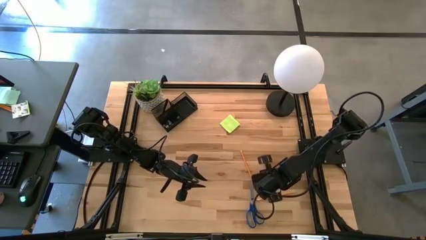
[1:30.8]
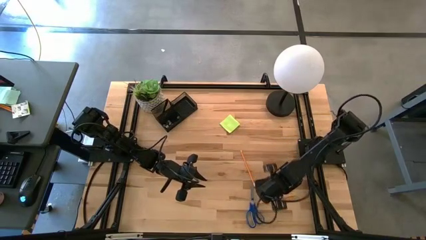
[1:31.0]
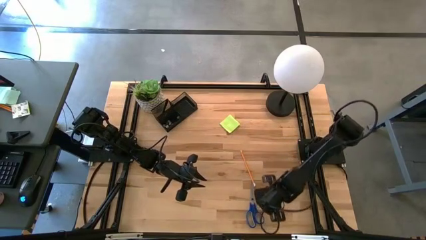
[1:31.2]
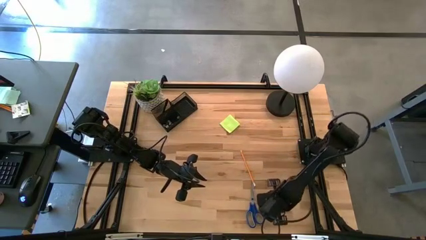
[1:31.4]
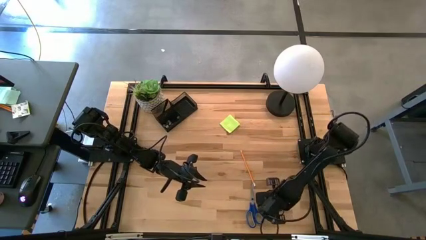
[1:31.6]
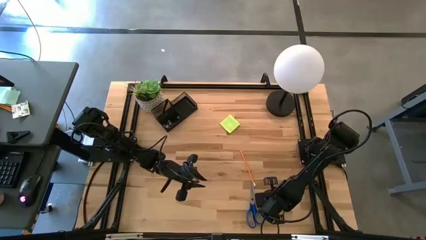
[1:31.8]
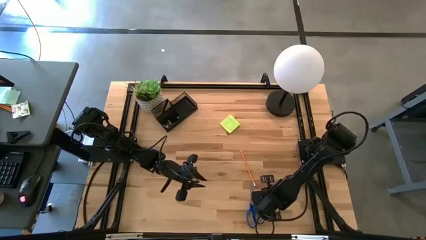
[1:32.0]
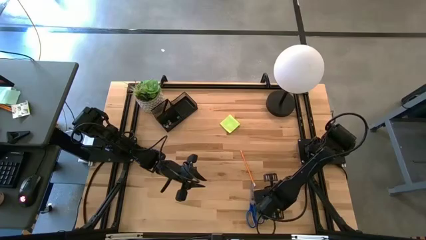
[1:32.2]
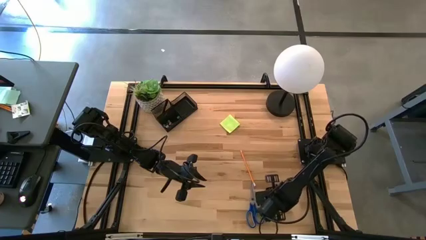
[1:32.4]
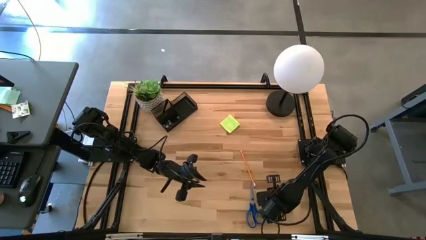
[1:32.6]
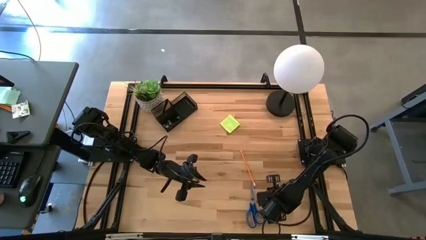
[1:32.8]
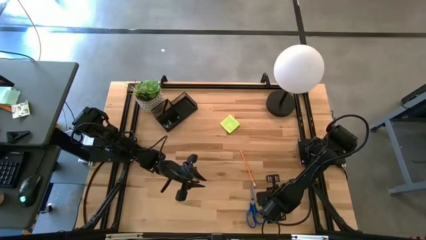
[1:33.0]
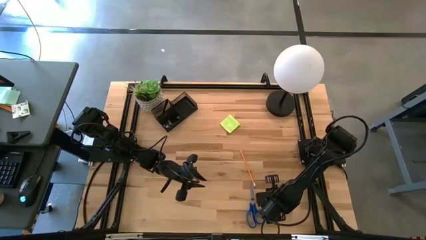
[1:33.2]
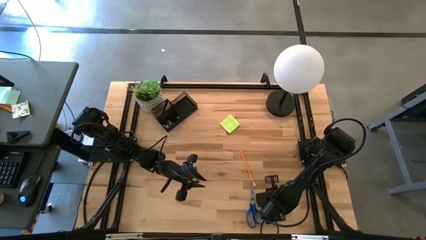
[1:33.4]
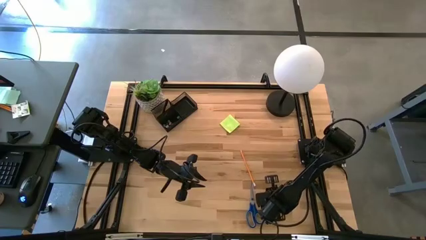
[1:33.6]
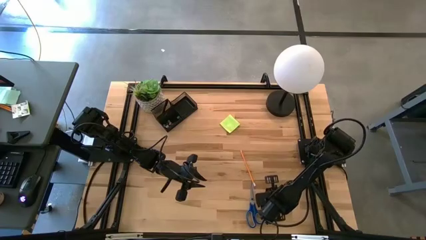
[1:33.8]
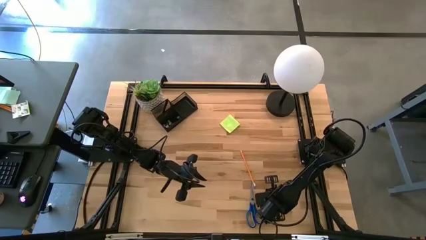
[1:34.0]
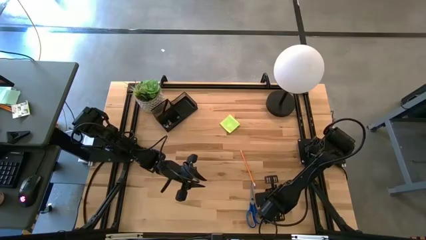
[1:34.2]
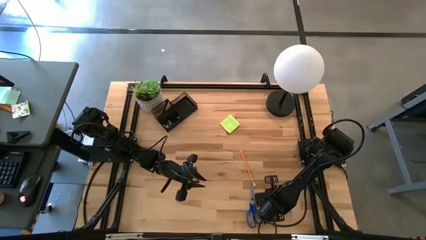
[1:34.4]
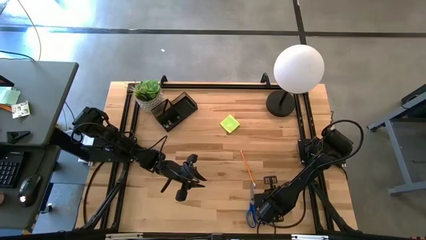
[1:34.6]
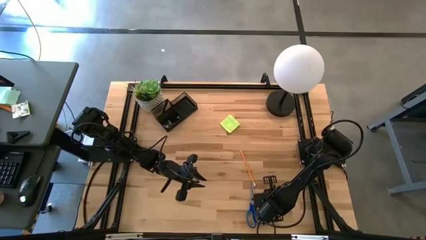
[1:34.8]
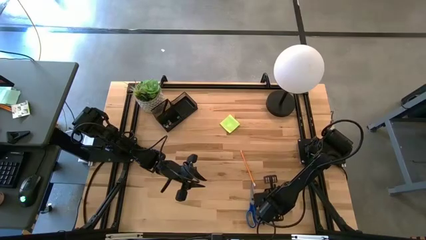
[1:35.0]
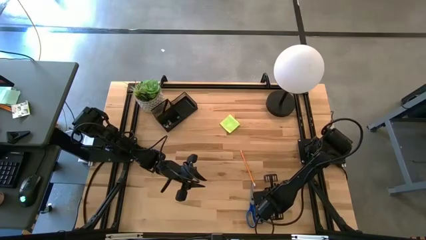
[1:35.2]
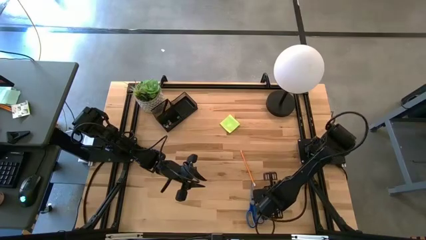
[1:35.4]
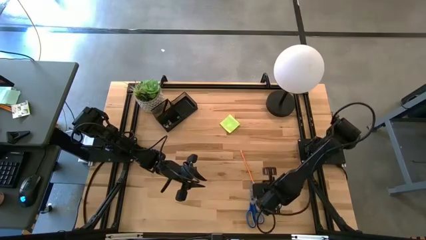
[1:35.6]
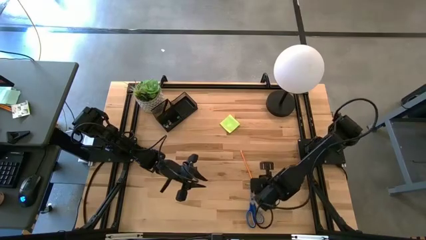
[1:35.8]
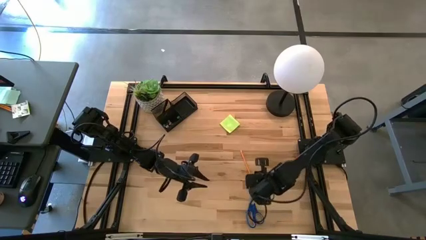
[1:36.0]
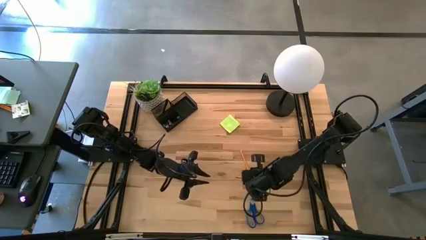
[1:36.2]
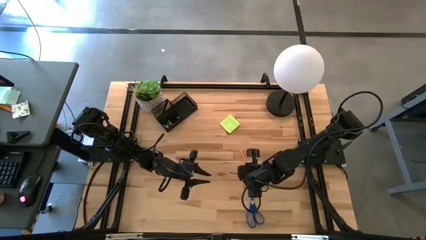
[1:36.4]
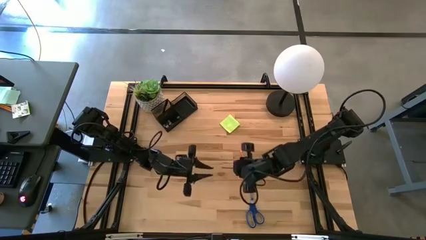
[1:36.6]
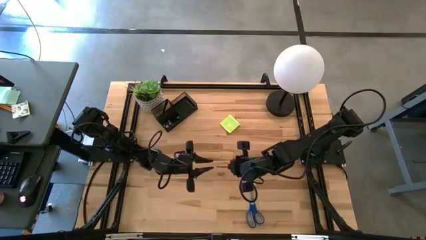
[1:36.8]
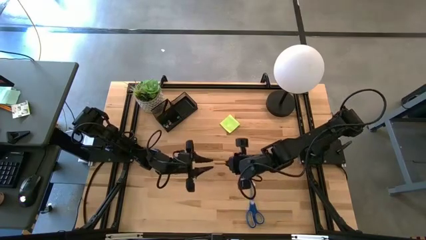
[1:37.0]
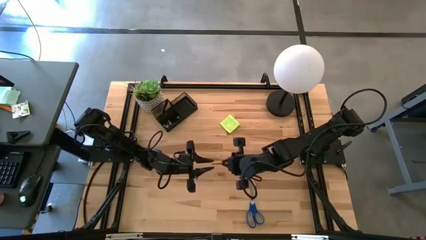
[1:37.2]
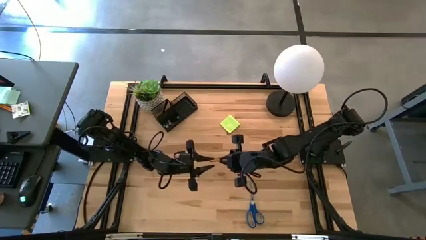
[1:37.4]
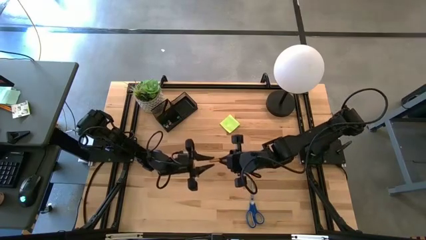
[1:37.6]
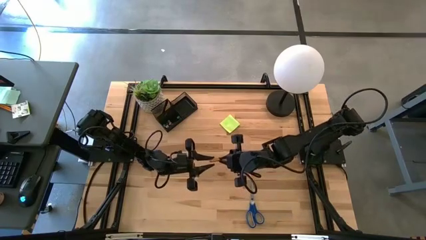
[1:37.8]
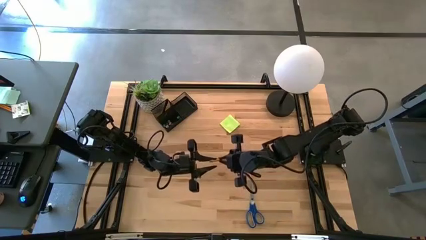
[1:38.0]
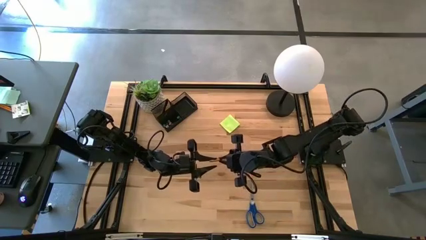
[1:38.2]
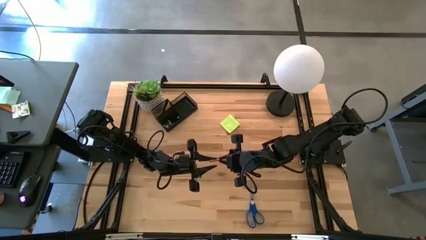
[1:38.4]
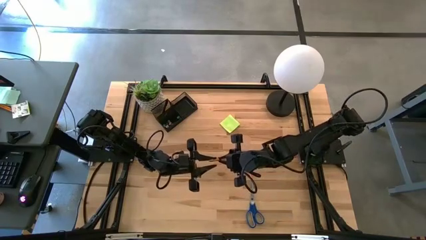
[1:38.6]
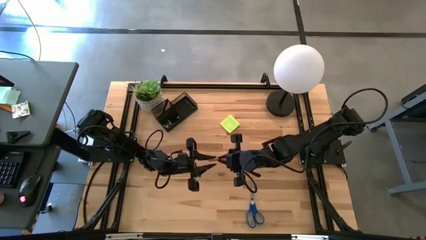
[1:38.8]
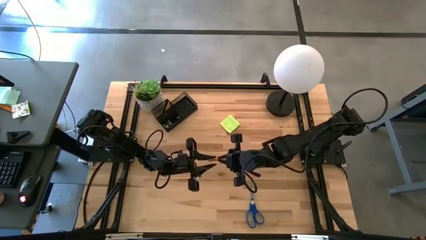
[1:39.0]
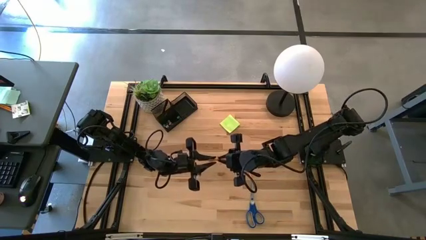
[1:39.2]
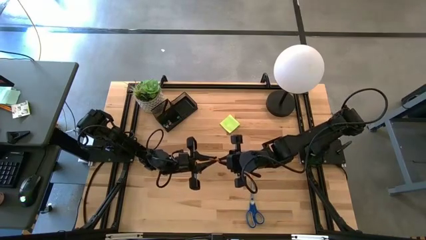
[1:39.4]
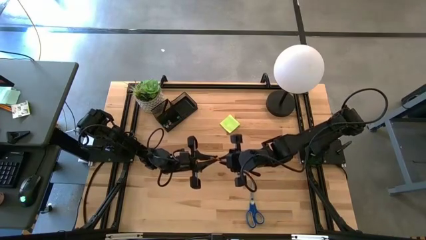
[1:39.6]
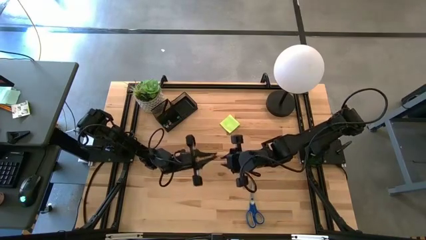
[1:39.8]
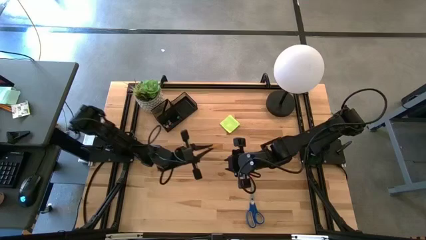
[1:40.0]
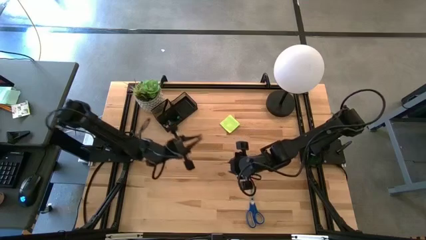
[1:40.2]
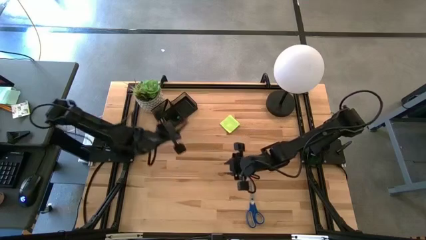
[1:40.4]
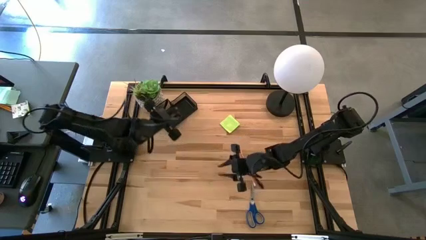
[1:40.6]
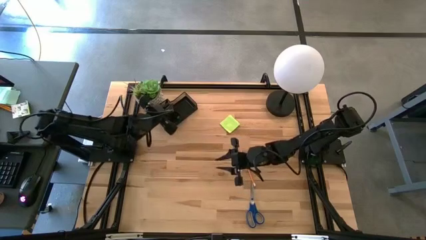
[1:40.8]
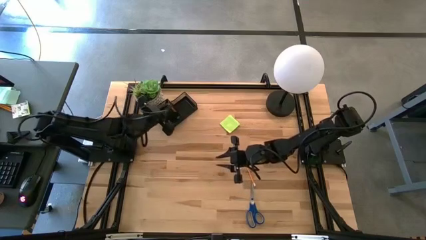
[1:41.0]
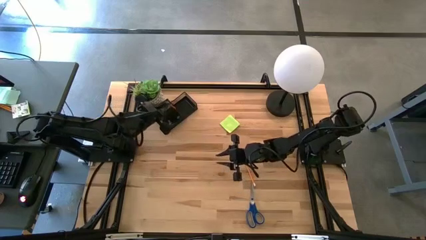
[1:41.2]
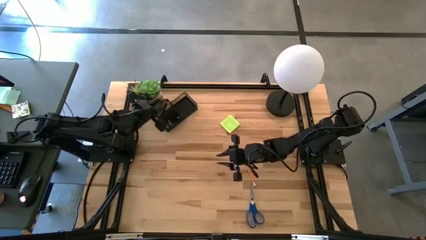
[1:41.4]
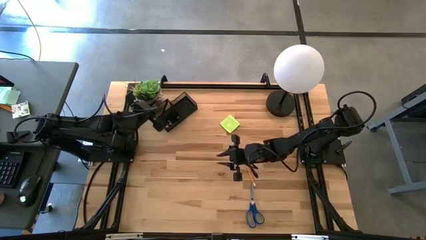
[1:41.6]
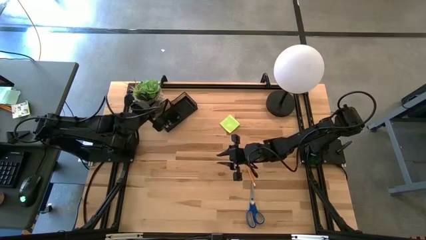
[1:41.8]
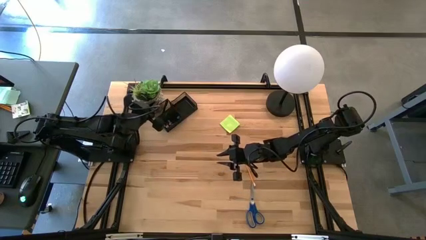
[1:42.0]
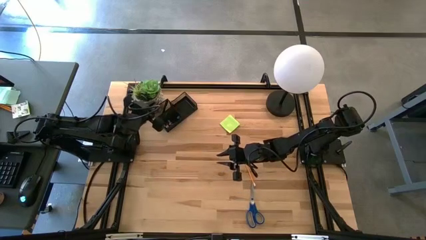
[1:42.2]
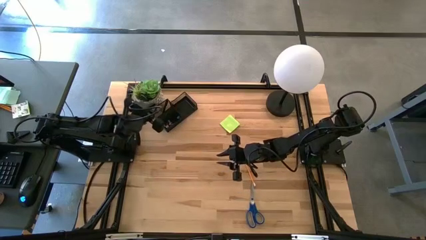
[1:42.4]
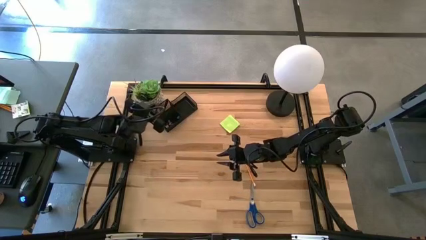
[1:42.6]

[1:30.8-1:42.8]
Task: Pick and place office supplies into organizer
Put the right yellow pencil into the desk organizer

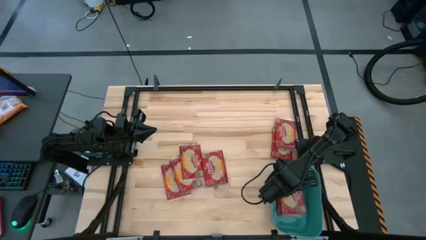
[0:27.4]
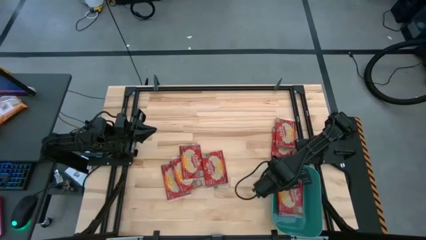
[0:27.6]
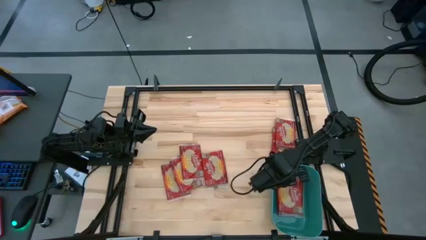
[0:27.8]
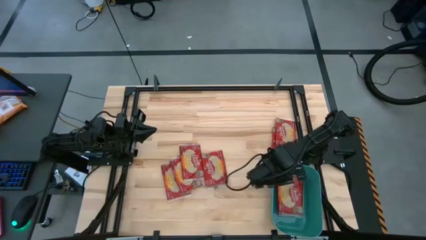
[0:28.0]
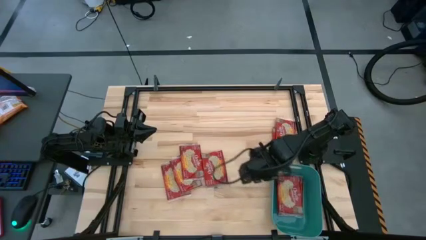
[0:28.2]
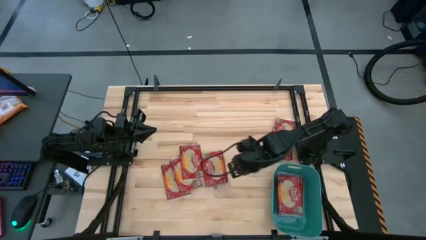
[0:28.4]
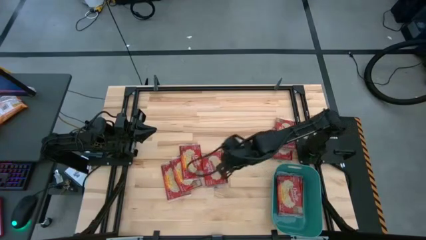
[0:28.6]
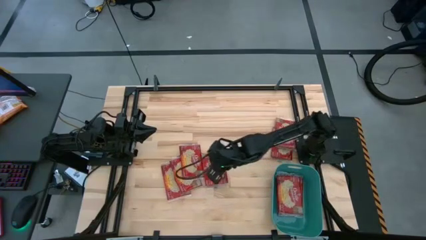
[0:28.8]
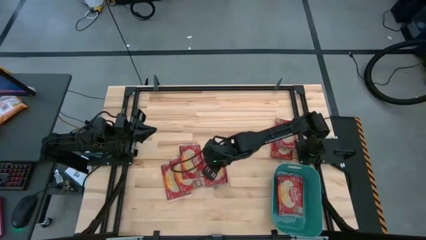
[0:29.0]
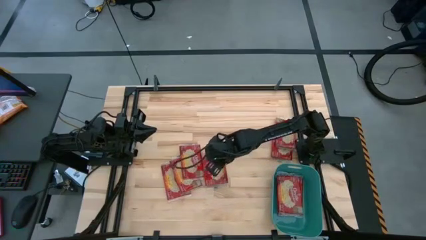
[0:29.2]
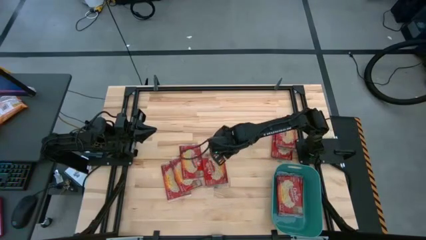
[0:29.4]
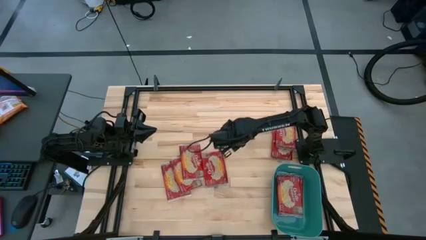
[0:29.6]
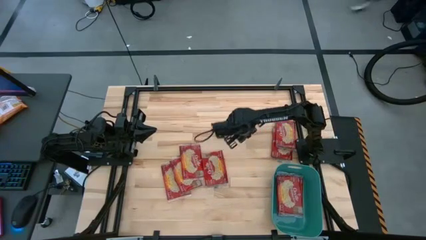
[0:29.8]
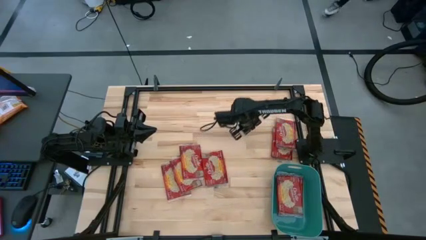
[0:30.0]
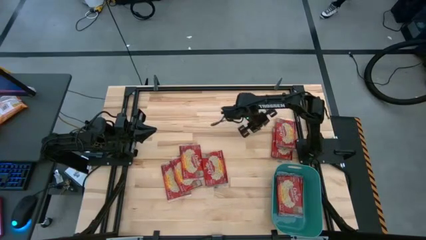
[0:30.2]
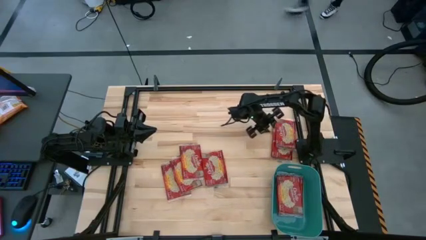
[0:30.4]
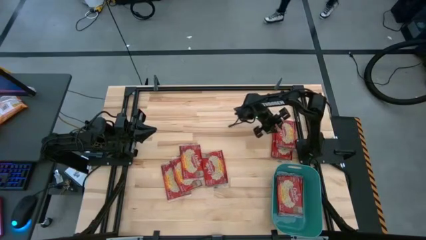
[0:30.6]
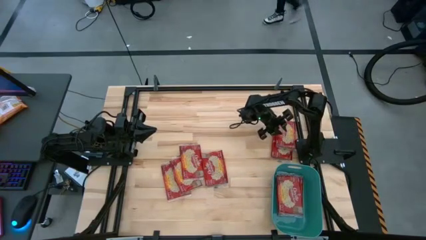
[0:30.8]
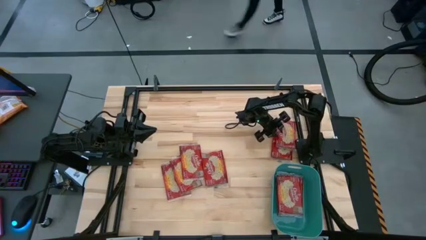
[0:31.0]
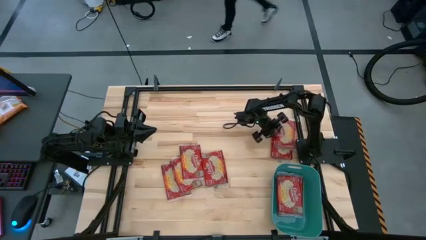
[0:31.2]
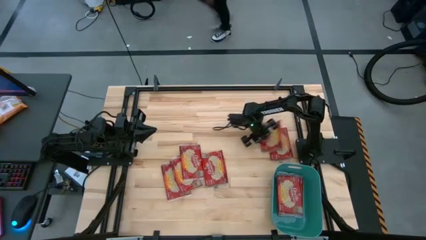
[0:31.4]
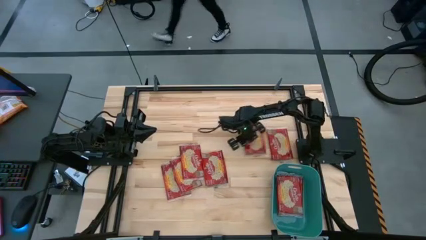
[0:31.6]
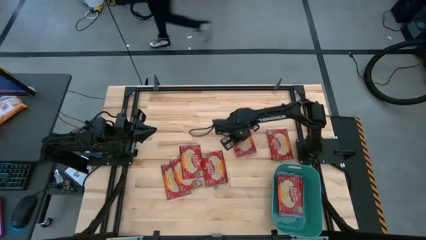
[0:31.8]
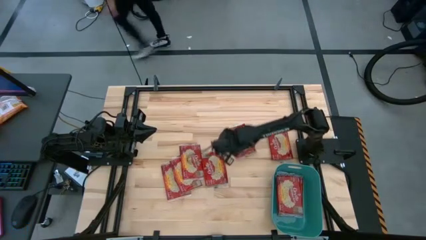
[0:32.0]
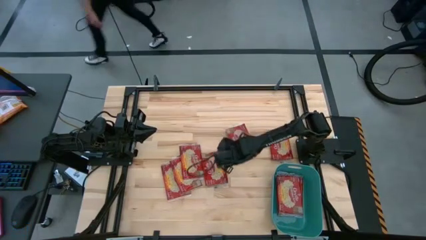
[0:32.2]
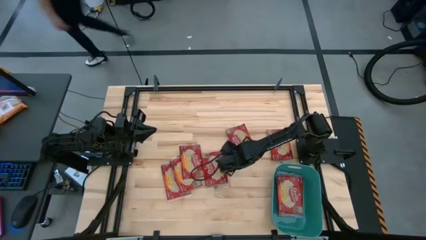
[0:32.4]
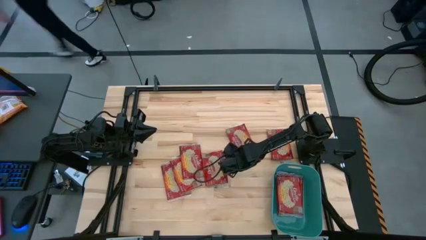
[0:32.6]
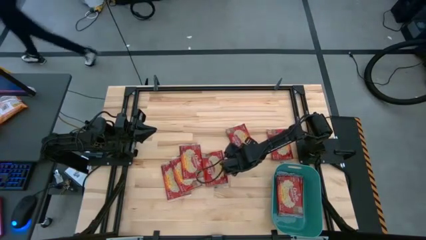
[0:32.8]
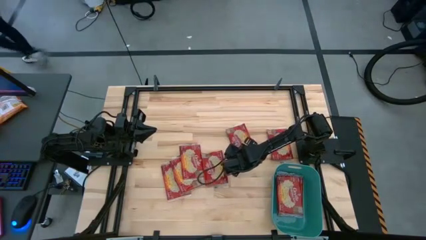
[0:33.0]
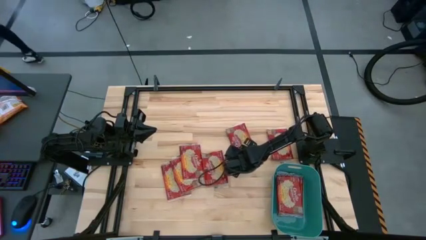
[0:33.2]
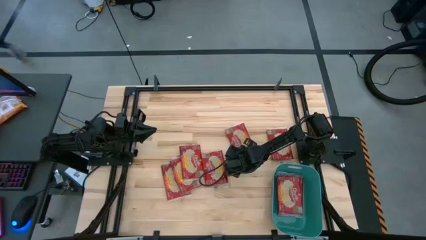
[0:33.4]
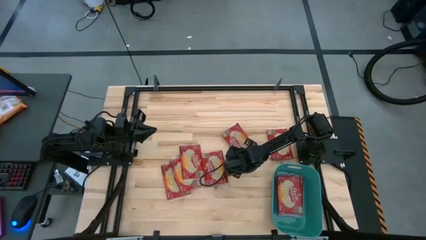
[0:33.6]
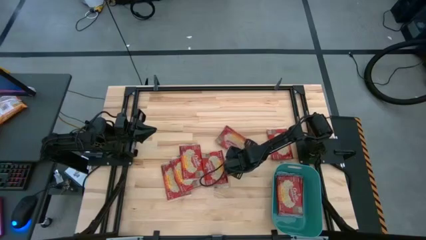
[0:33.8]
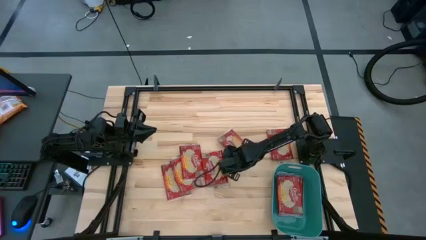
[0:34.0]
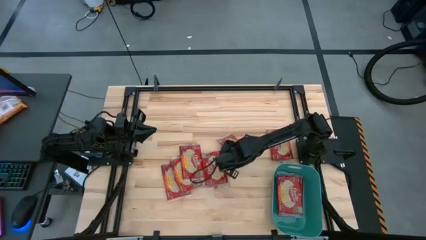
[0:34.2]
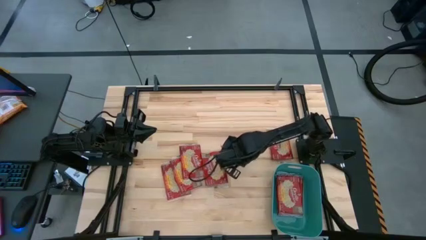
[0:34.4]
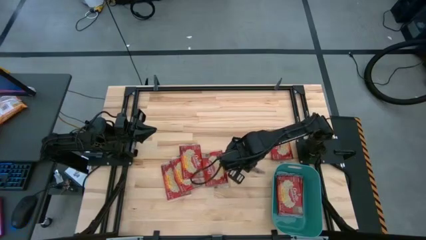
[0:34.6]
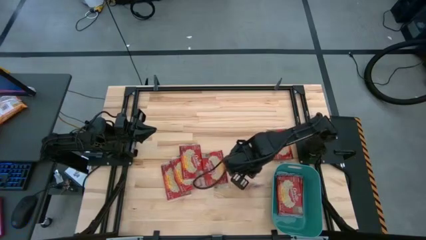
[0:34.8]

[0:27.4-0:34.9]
Task: Sort popcorn bags into baskets
Put the red popcorn into the green bin
